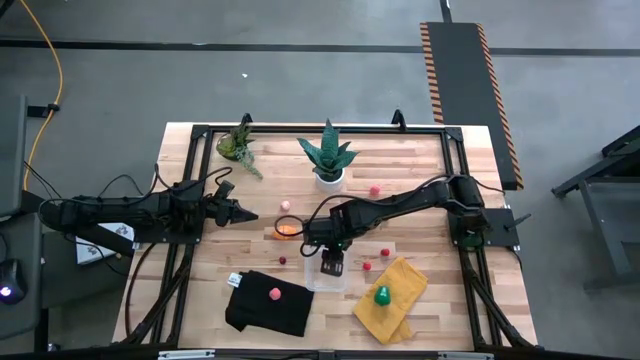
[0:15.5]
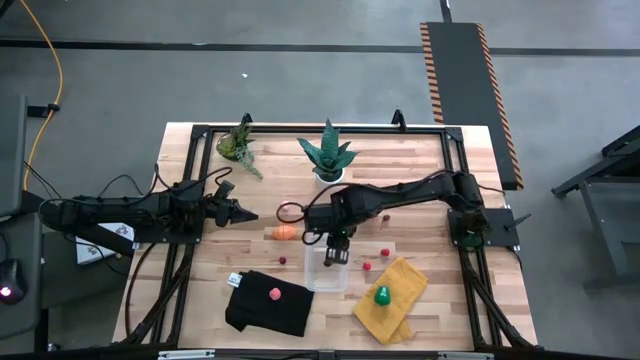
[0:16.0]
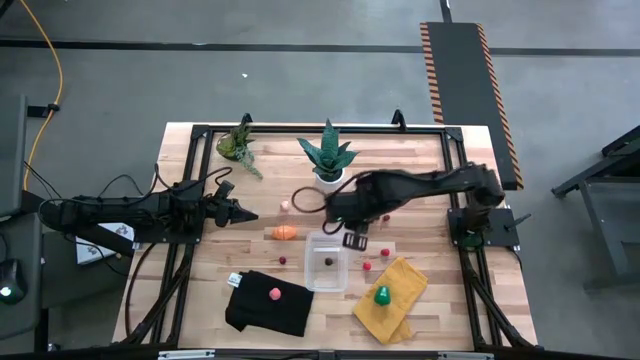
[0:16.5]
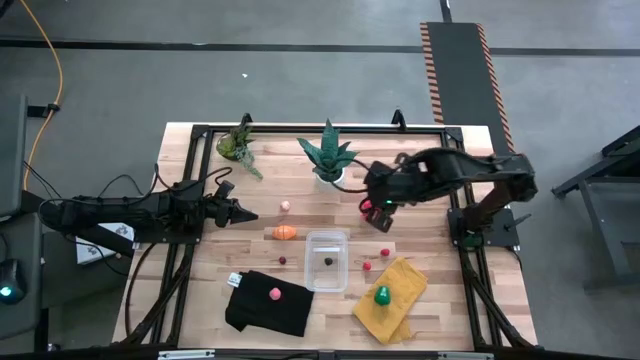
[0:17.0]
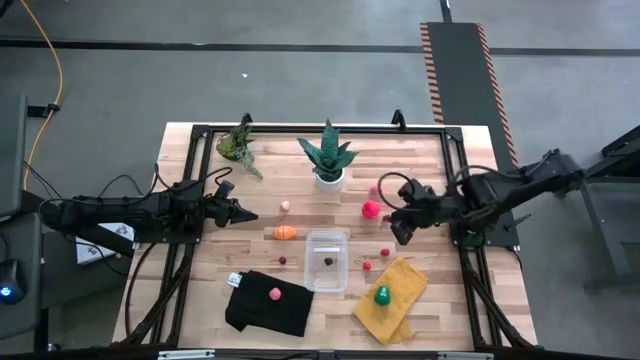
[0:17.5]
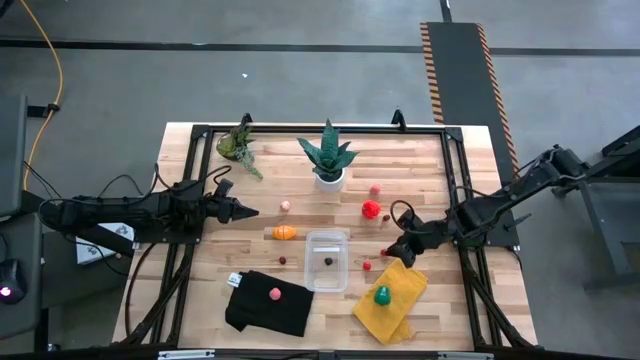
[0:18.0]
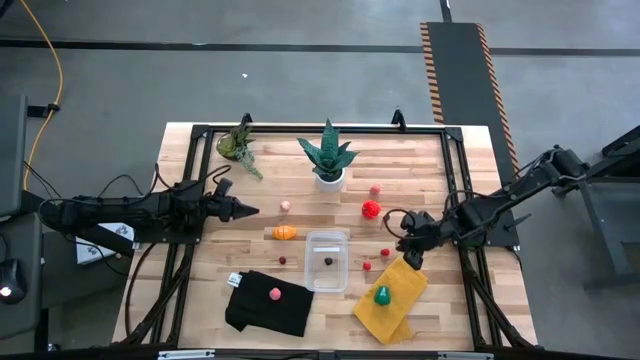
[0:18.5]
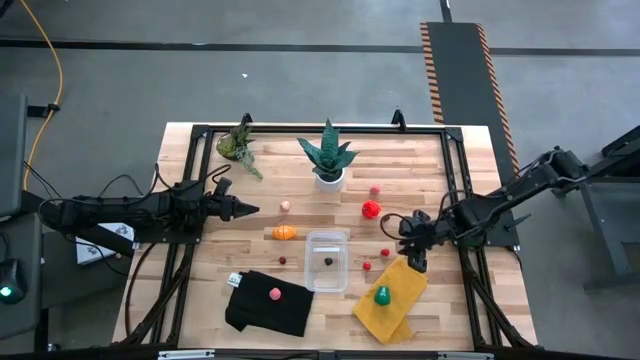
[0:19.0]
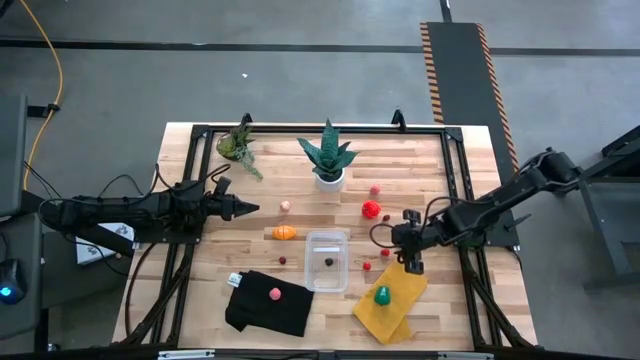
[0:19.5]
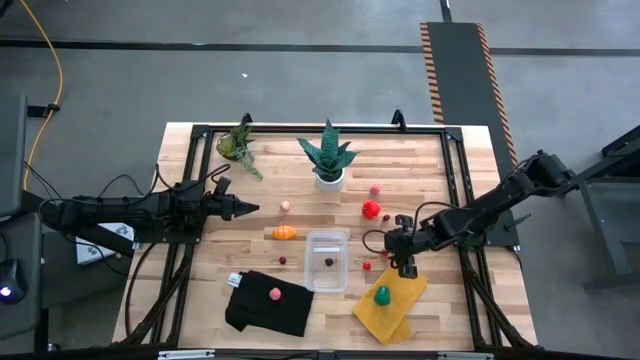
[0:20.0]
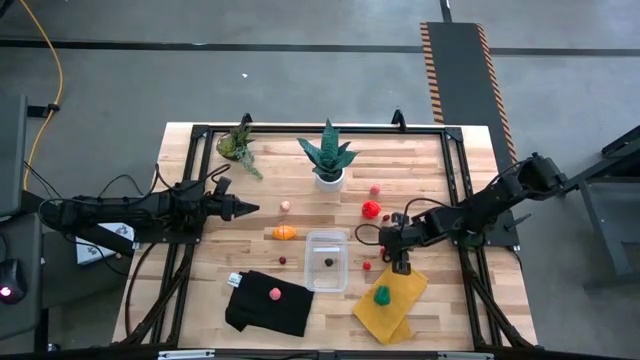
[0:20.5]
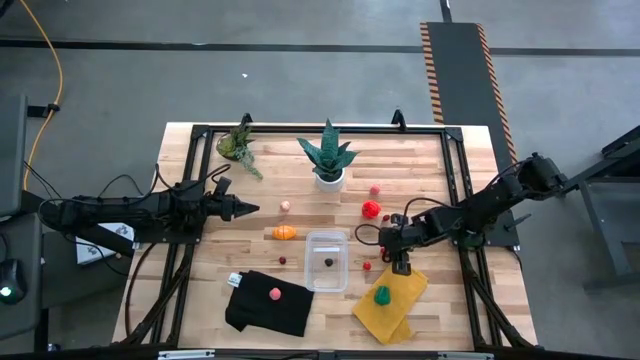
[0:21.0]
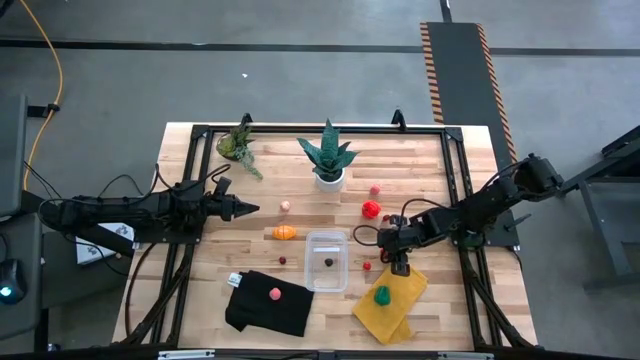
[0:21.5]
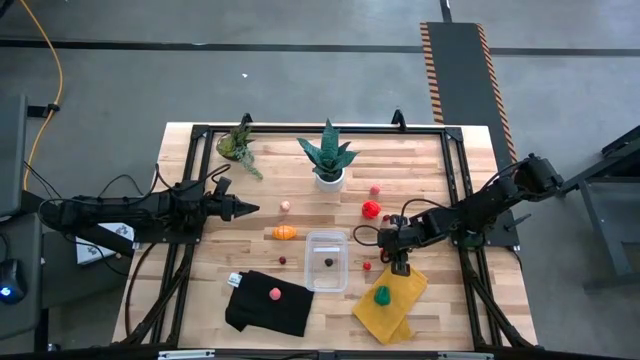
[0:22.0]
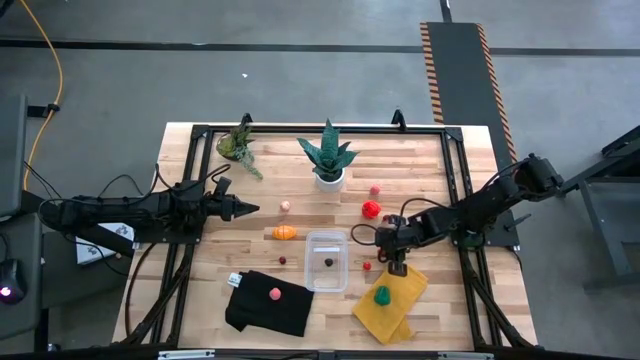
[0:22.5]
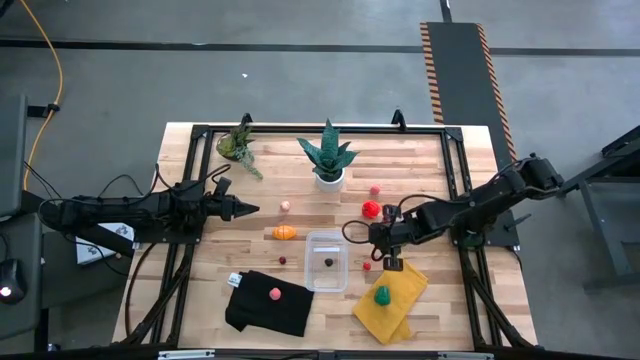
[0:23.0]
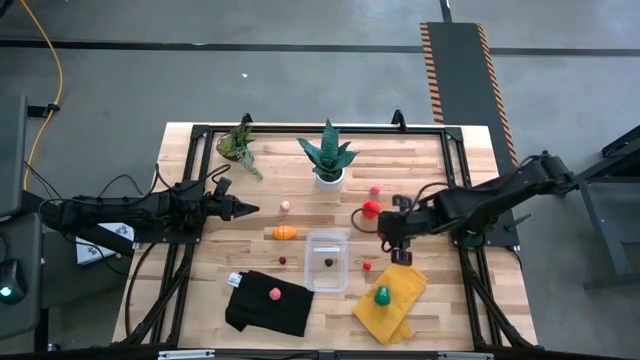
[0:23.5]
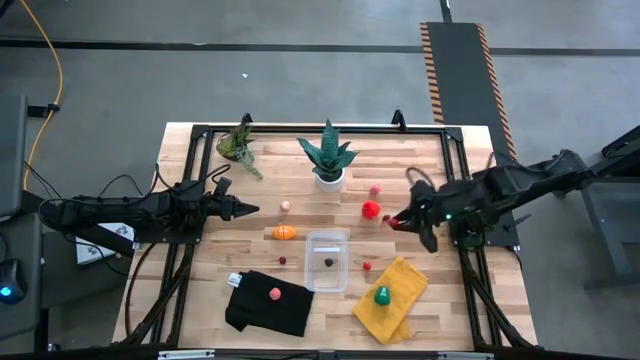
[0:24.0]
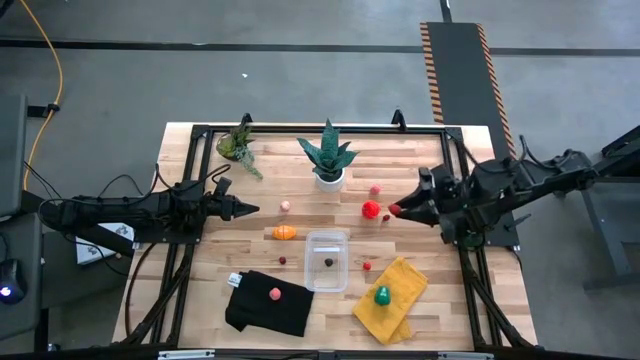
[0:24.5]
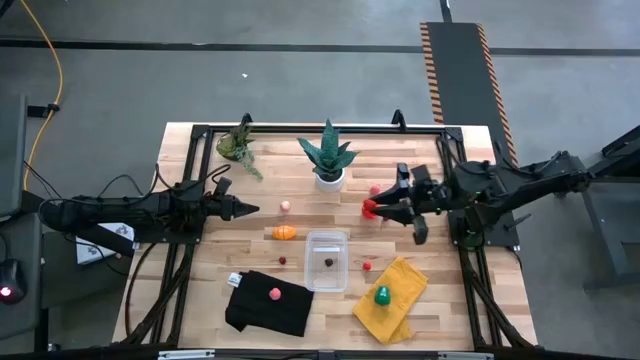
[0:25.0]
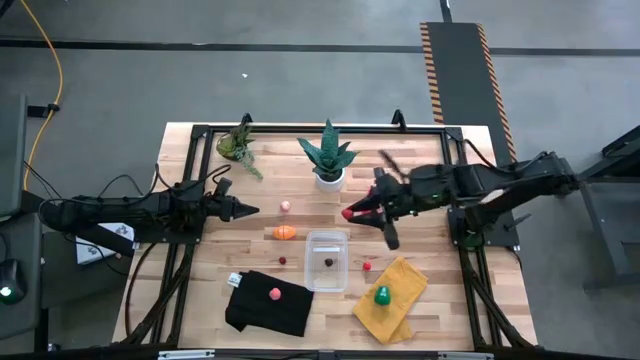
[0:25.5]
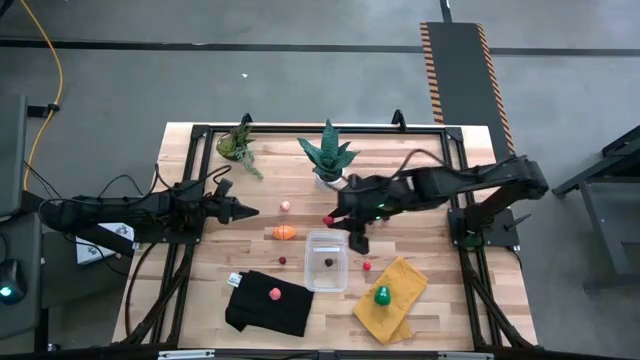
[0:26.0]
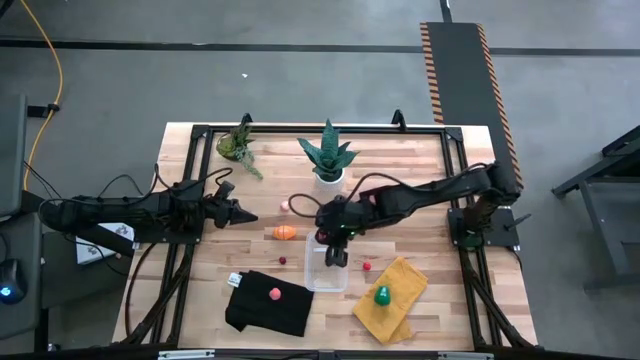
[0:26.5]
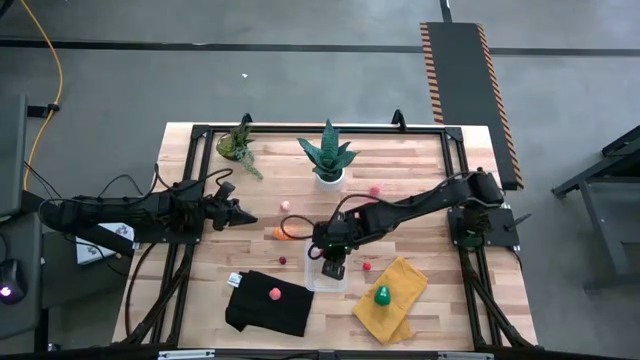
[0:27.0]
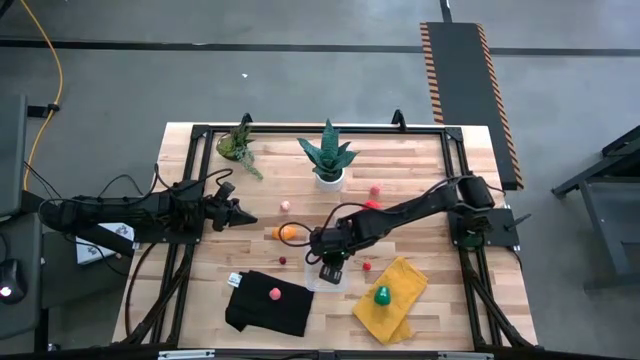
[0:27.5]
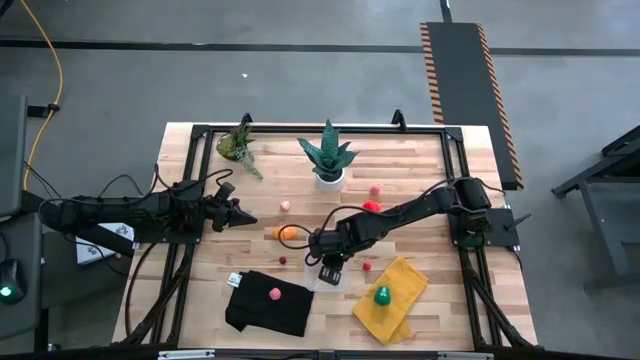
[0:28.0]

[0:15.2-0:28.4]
Task: Pick and placing Produce into tupperware
Put the raspberry into the transparent container
